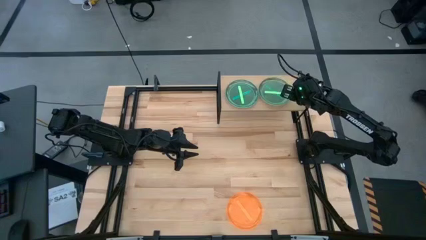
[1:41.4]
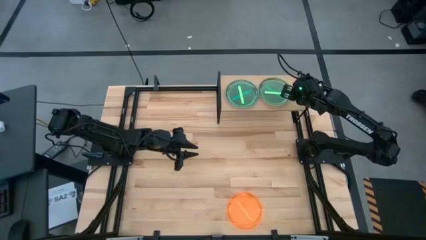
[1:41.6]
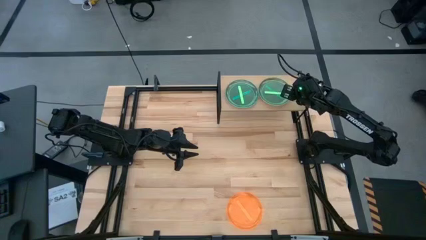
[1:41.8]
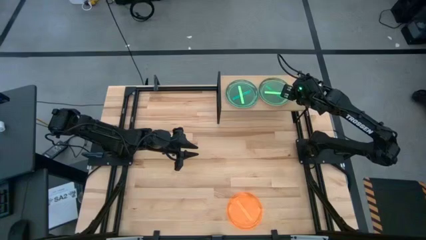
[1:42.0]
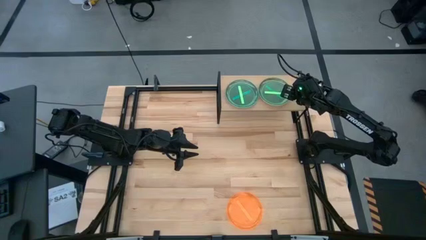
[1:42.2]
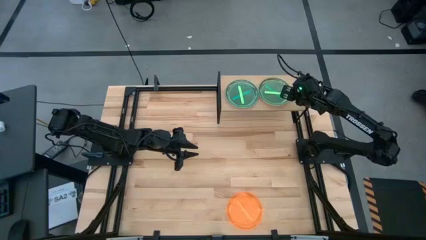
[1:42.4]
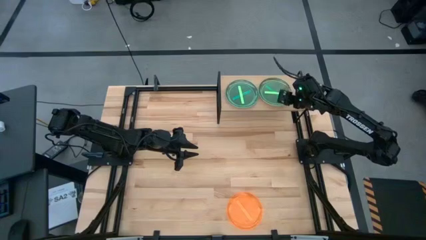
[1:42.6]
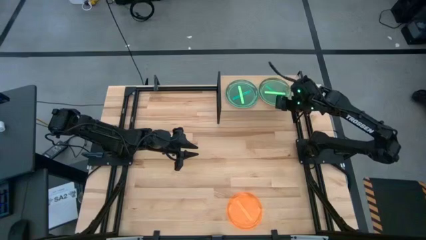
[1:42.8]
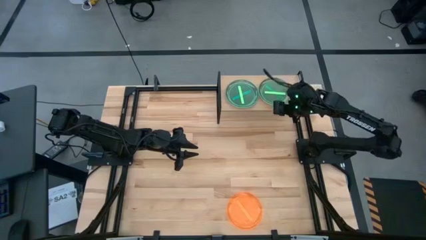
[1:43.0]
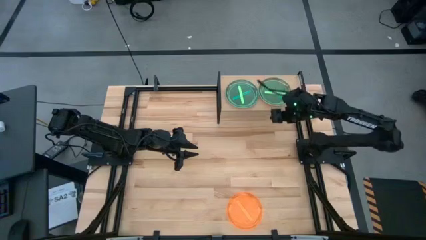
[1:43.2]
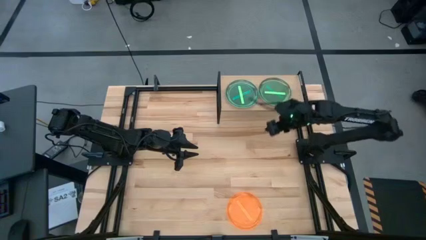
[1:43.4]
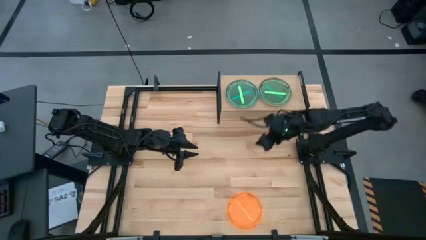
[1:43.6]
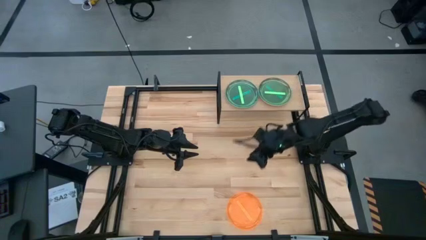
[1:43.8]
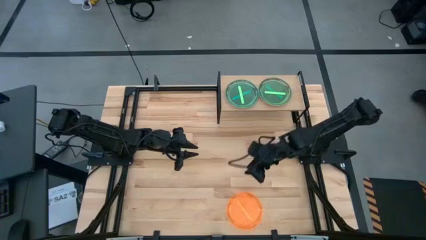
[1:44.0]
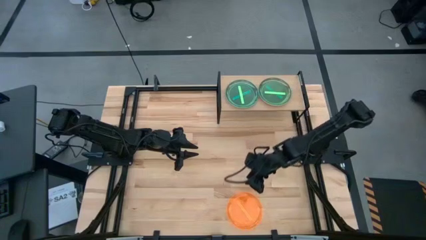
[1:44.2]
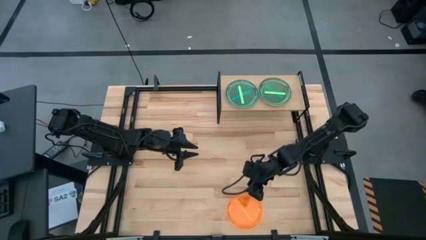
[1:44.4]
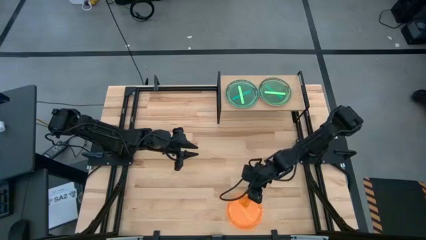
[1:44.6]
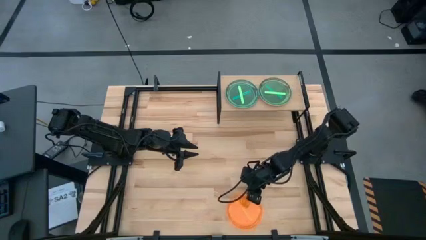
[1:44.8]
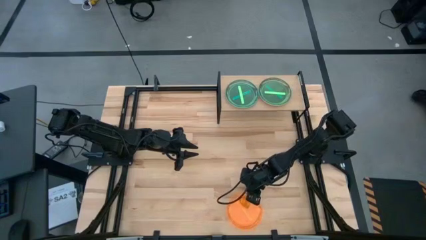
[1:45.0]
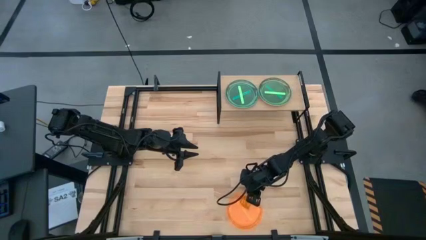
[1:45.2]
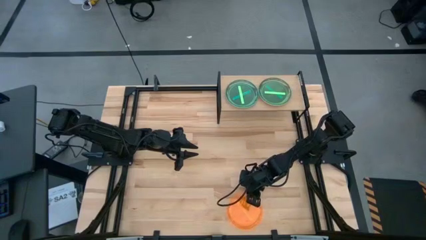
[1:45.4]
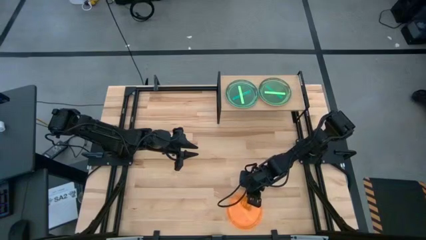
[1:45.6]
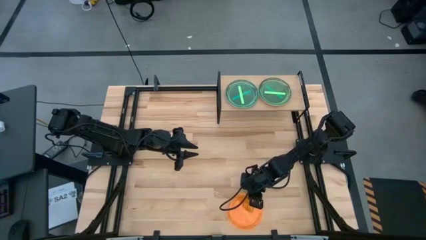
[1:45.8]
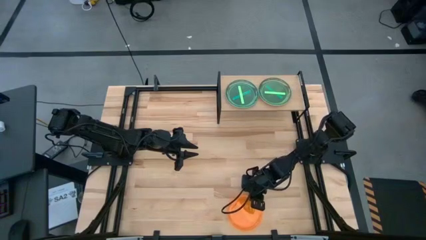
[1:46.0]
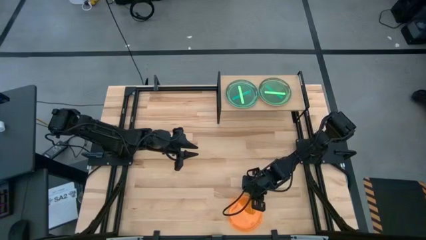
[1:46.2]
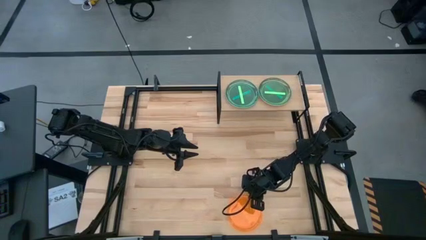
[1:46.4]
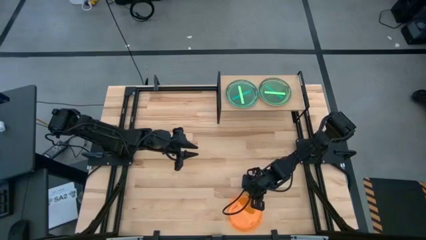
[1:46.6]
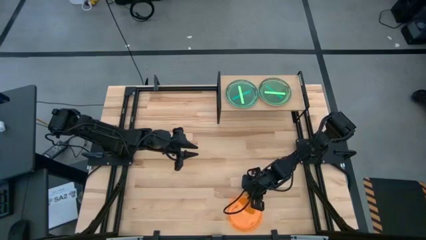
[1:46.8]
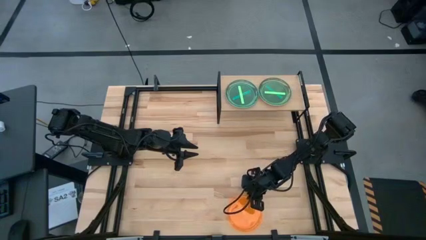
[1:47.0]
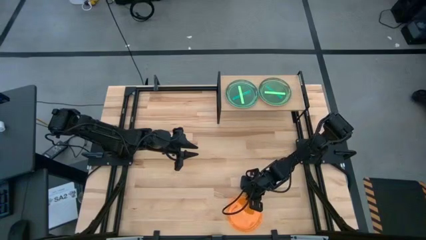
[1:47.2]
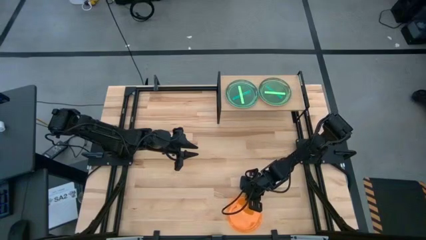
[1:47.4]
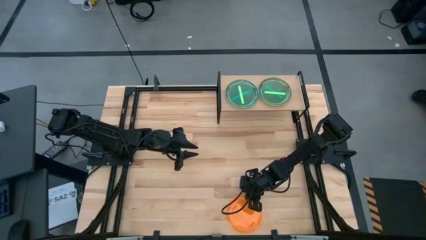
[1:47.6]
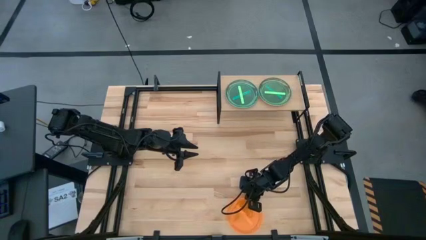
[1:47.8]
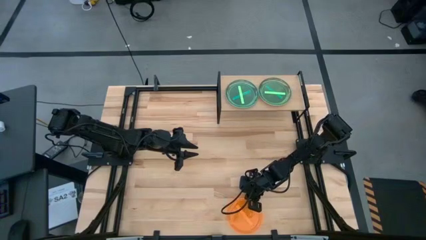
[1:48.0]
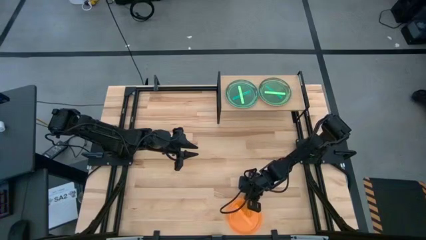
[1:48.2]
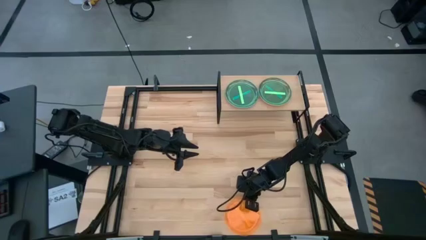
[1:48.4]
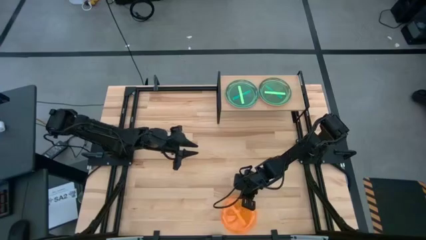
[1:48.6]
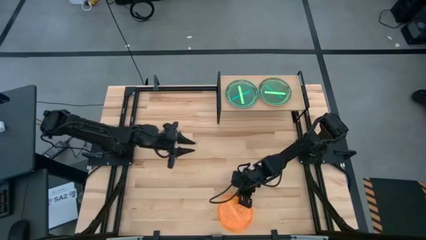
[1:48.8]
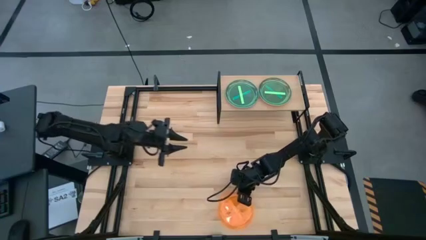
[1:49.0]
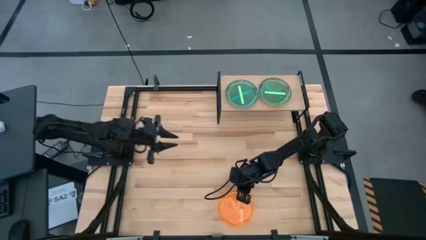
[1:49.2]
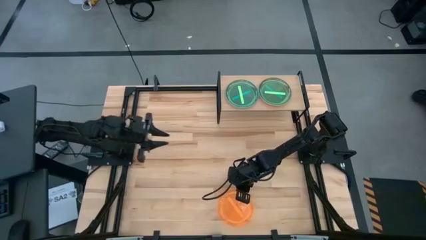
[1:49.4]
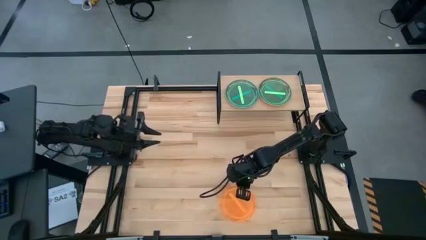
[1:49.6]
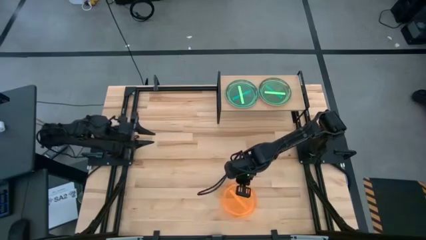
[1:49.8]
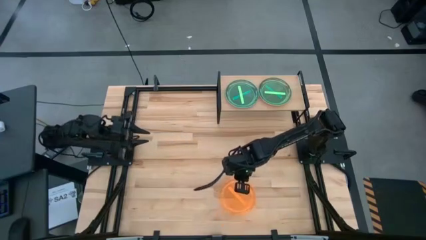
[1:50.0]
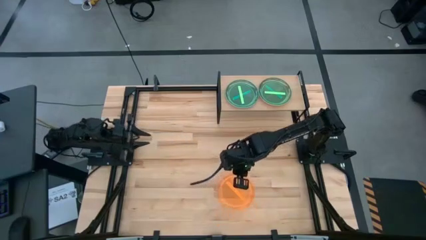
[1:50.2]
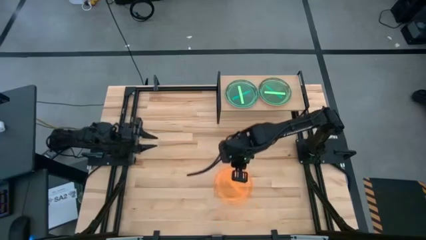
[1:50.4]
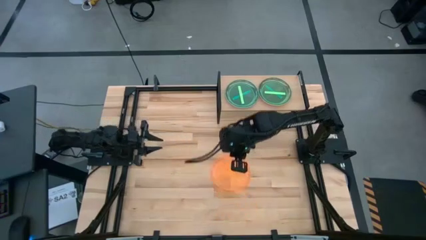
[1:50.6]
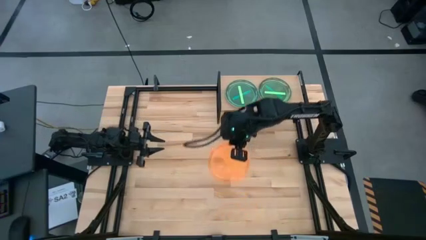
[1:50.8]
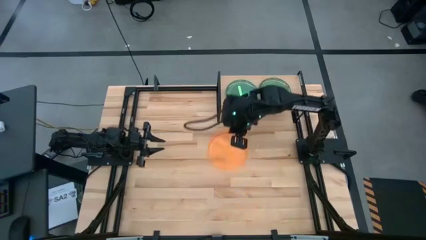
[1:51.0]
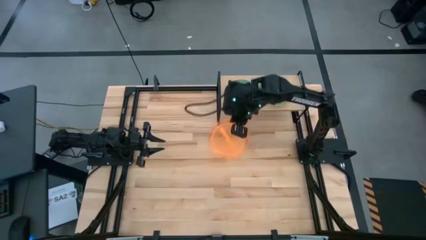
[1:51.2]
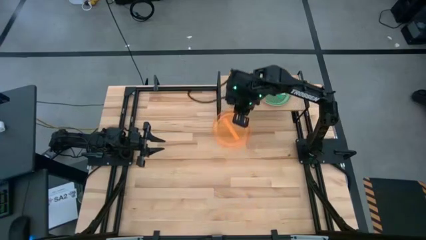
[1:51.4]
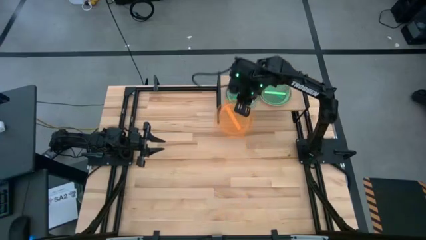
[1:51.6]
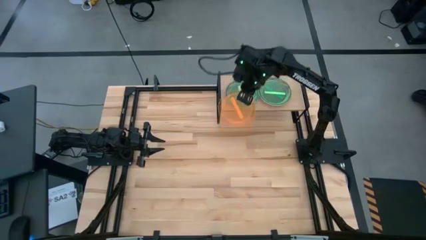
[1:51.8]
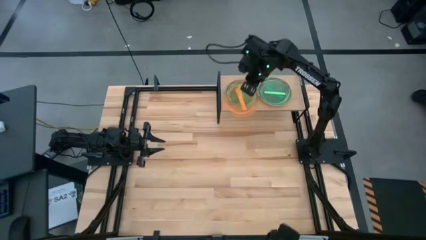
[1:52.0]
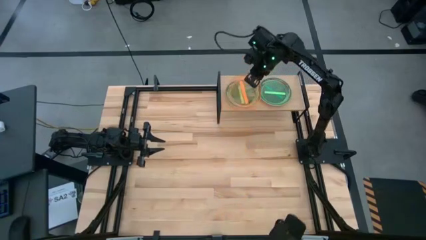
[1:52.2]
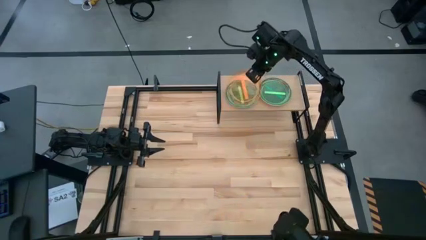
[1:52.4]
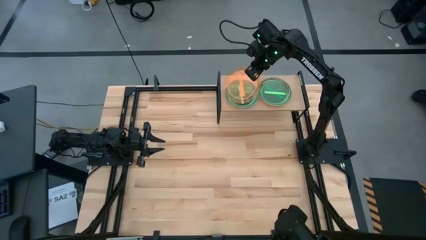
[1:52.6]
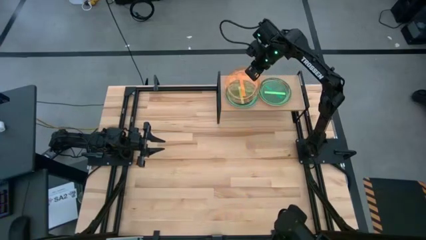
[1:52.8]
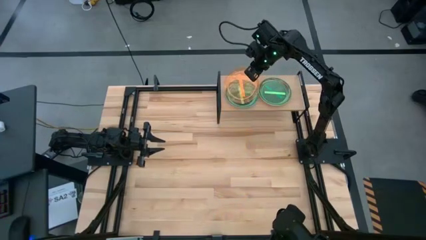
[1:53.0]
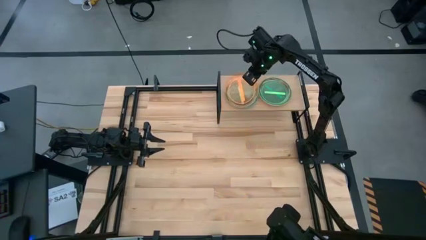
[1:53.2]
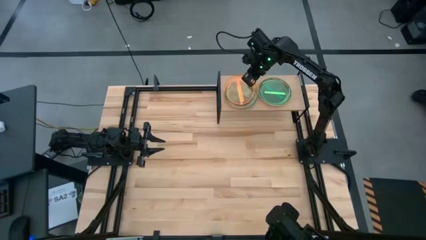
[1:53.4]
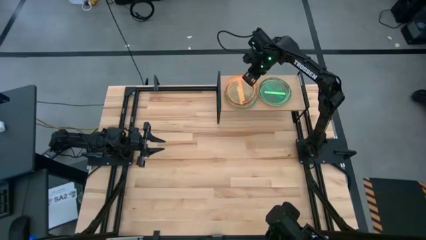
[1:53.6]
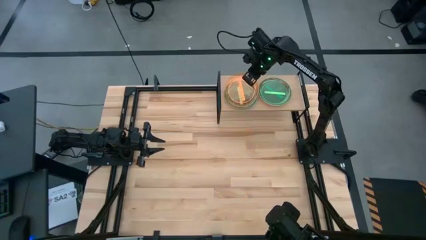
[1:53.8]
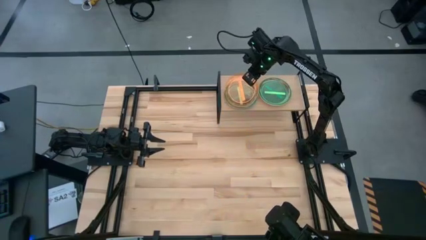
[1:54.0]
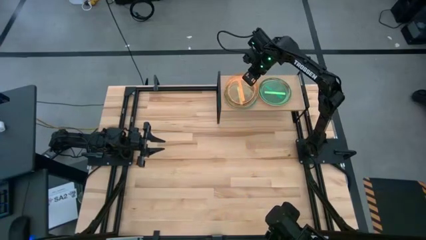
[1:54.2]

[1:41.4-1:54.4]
Task: Place and stack plates onto a shelf
Stack the orange plate on top of the green plate on the shelf
